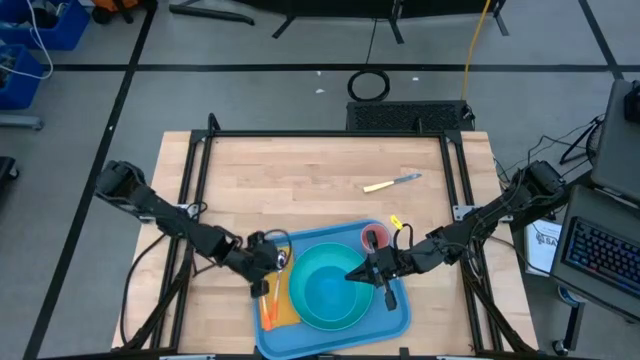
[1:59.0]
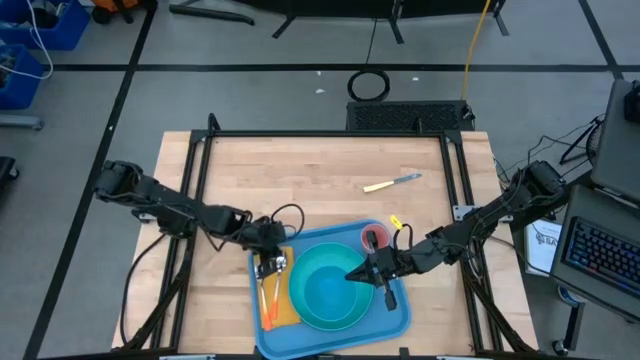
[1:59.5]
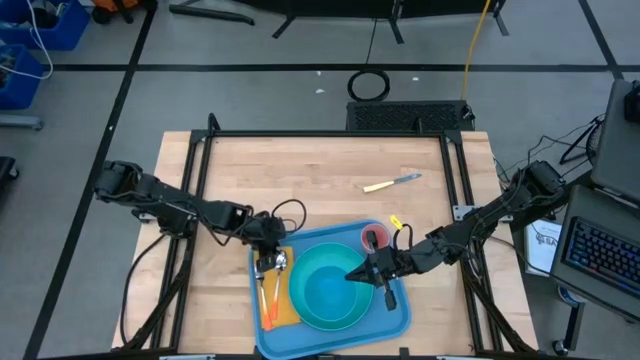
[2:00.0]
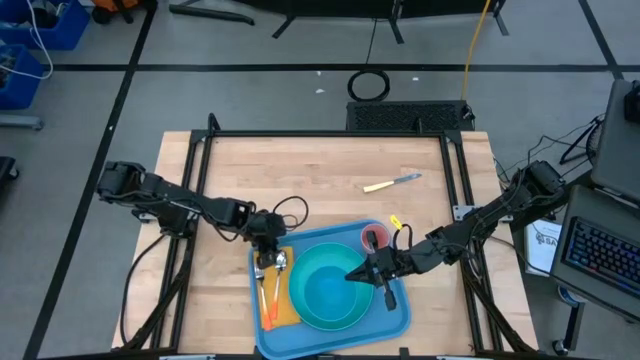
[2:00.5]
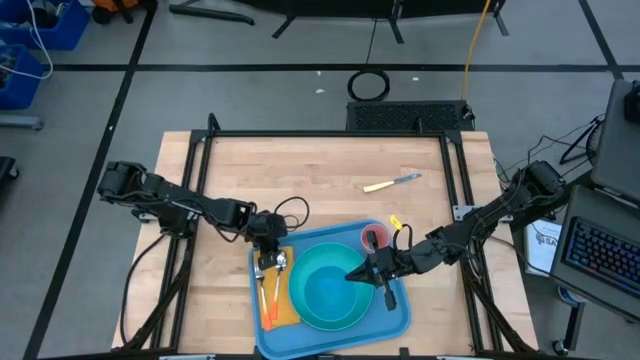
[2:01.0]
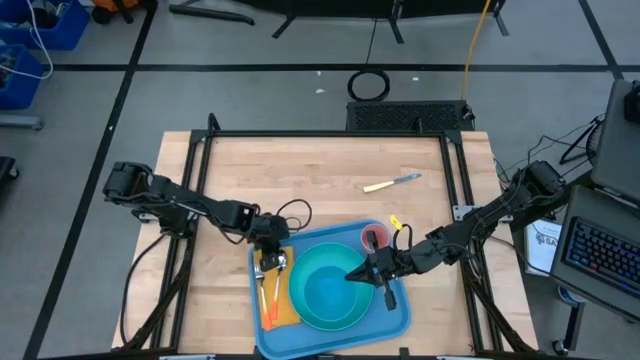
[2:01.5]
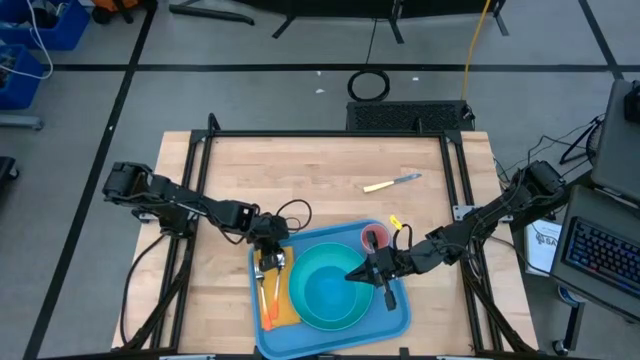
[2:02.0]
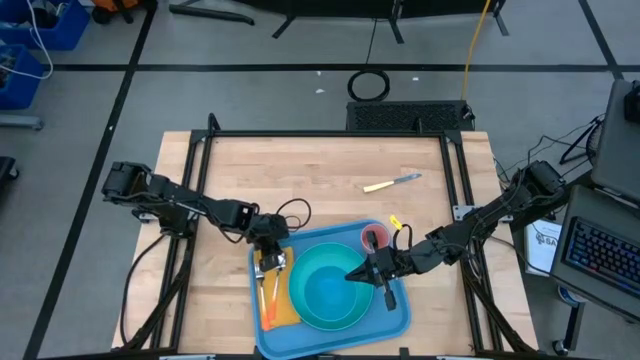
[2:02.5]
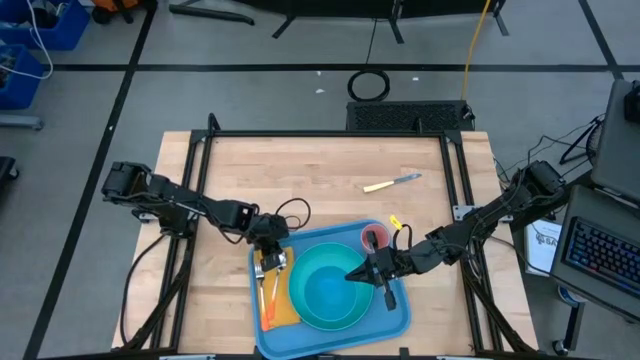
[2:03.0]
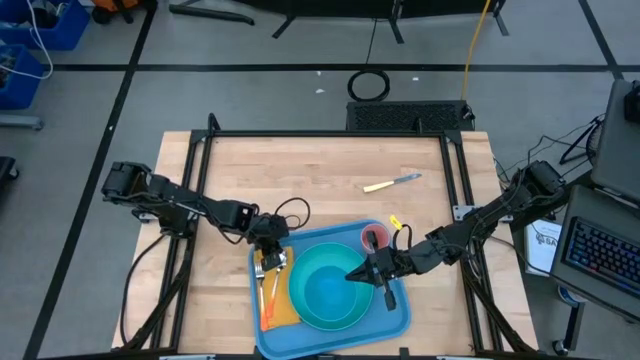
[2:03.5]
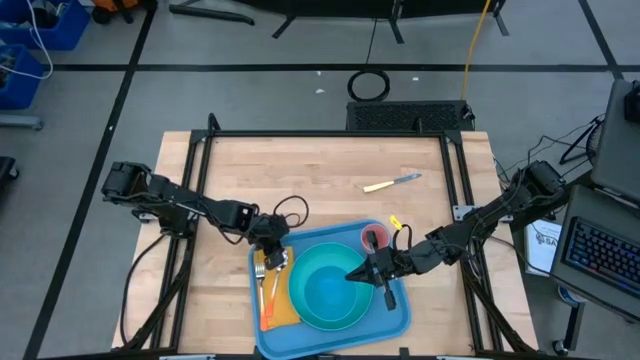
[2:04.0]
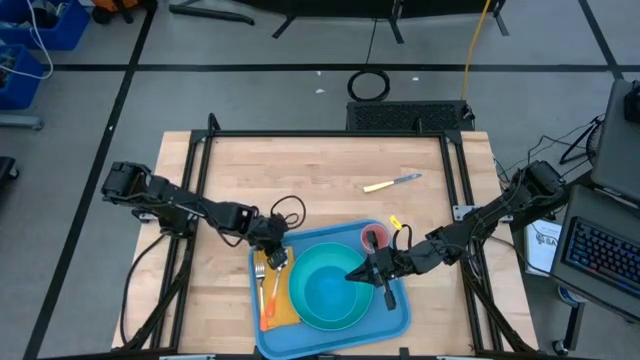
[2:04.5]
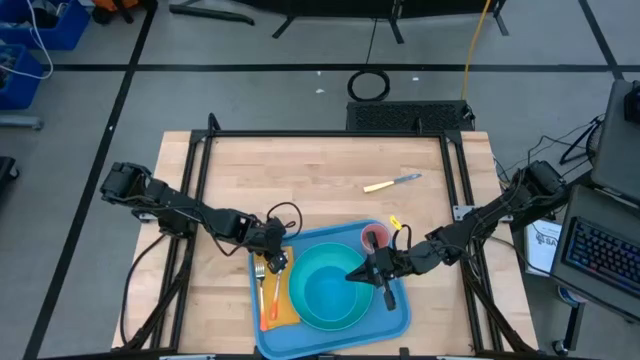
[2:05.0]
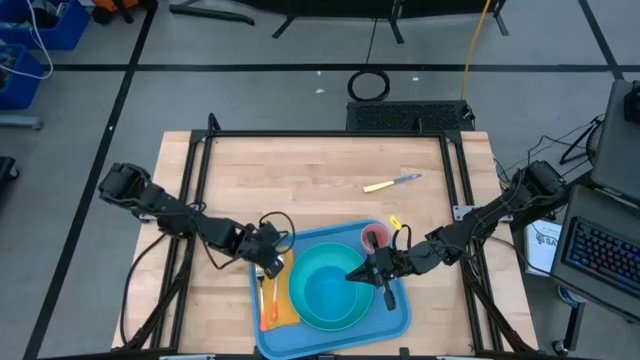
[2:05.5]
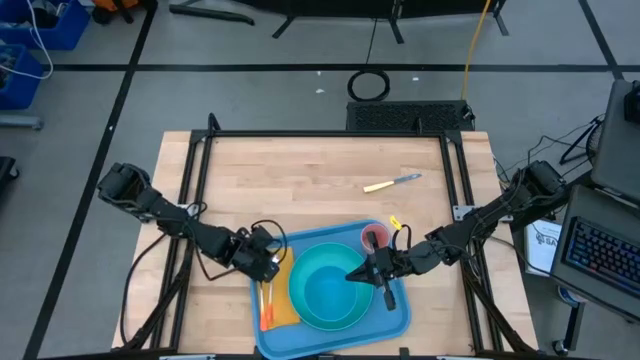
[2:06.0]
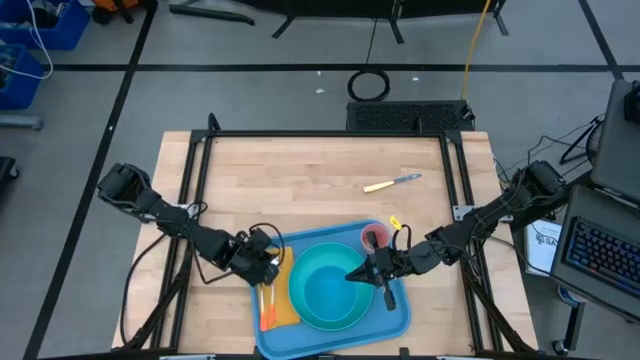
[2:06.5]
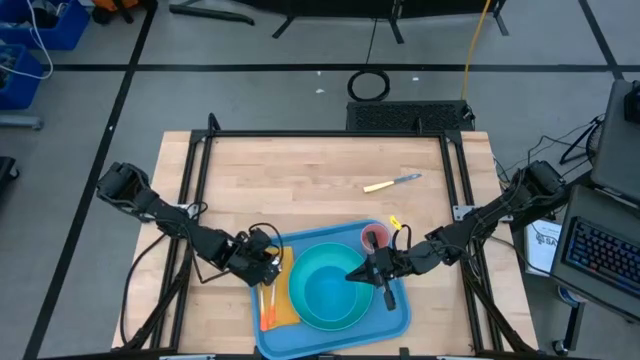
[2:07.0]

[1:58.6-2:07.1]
Task: Set up tray
Adjust the spoon on the napkin

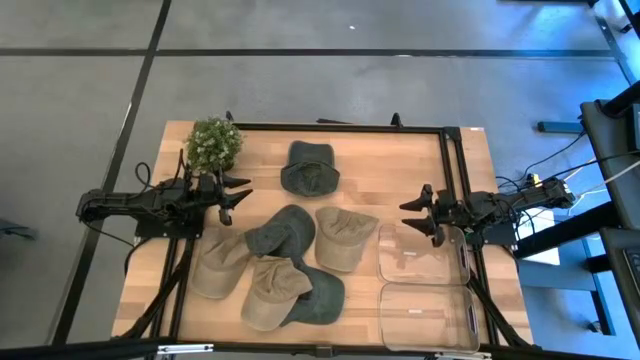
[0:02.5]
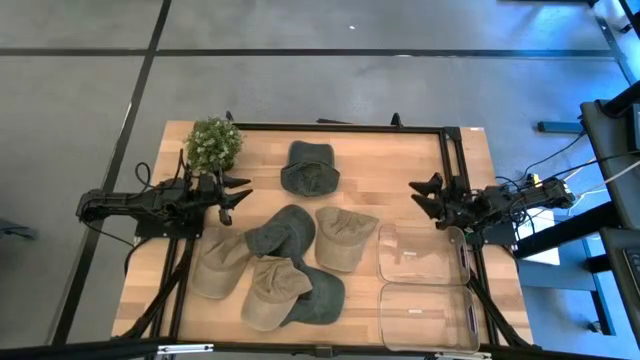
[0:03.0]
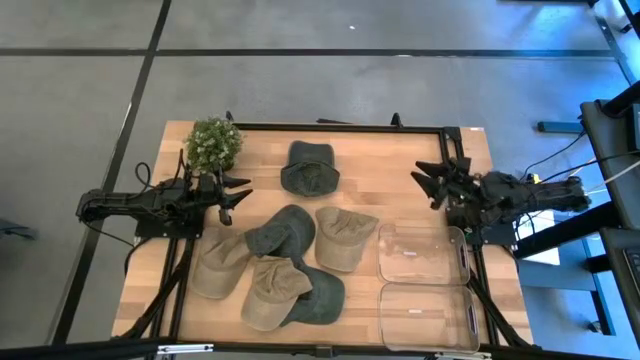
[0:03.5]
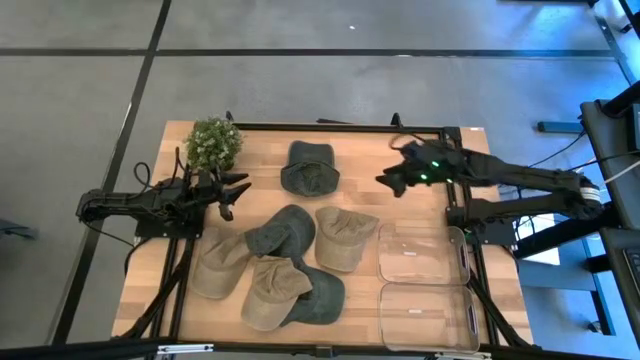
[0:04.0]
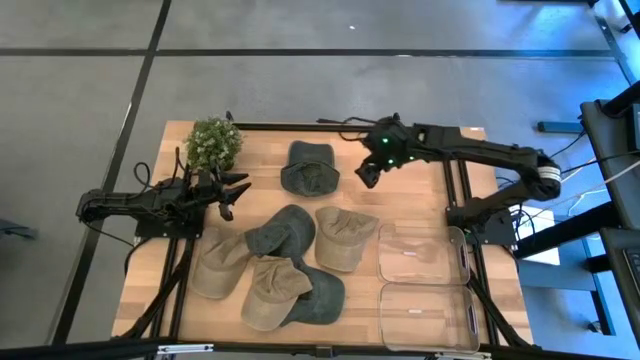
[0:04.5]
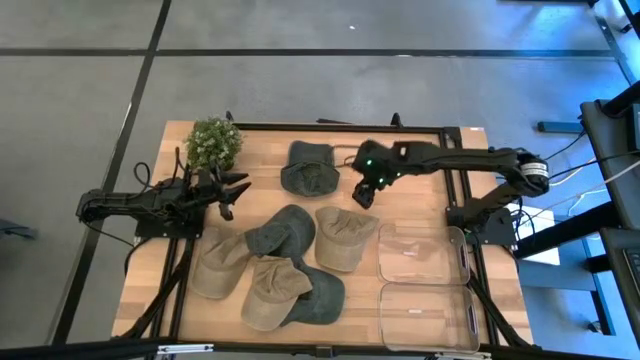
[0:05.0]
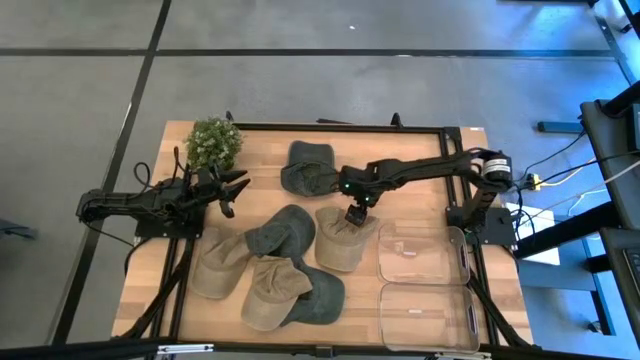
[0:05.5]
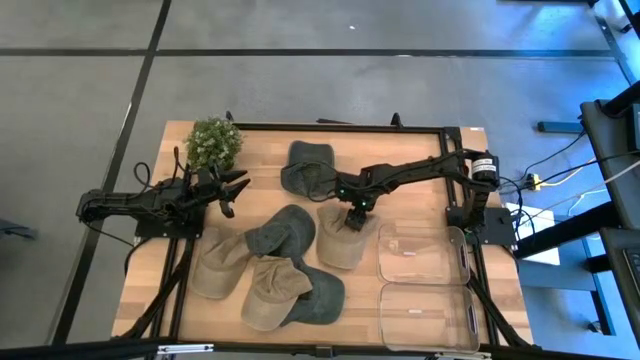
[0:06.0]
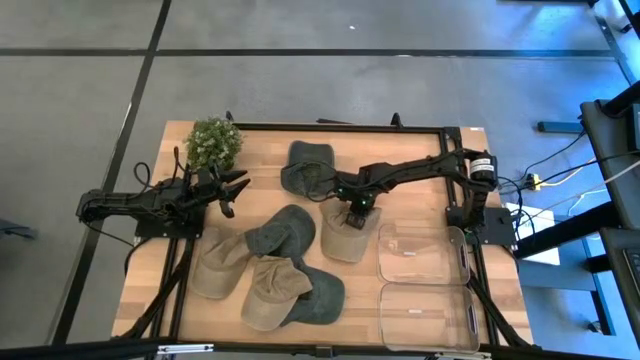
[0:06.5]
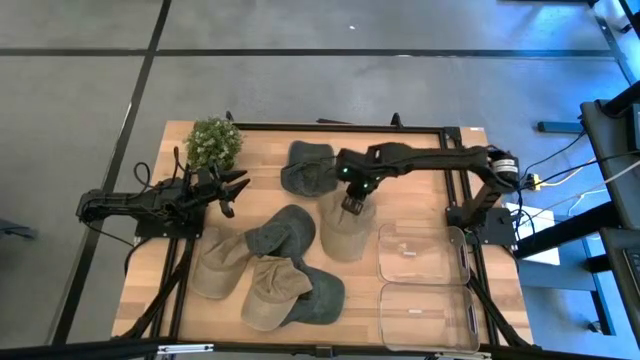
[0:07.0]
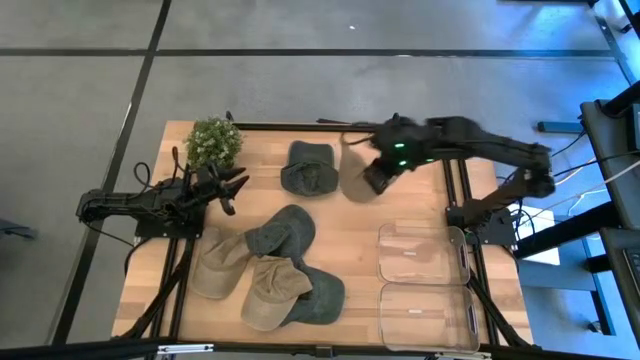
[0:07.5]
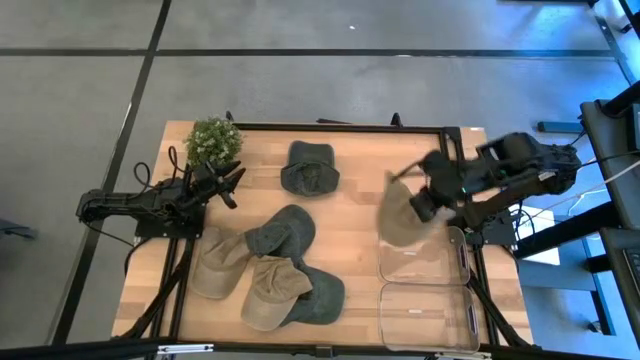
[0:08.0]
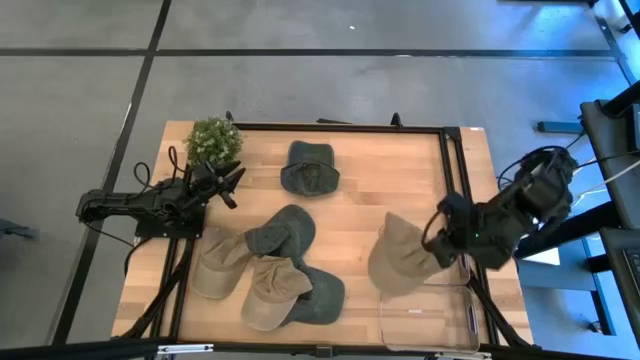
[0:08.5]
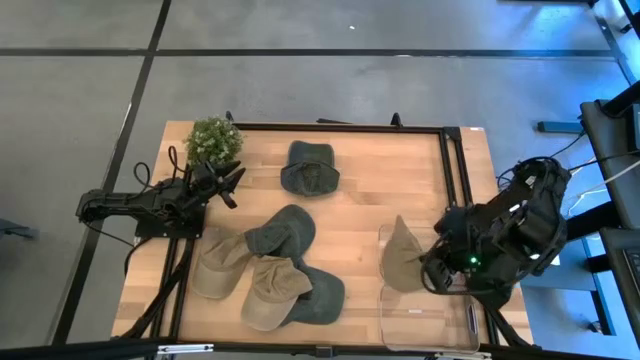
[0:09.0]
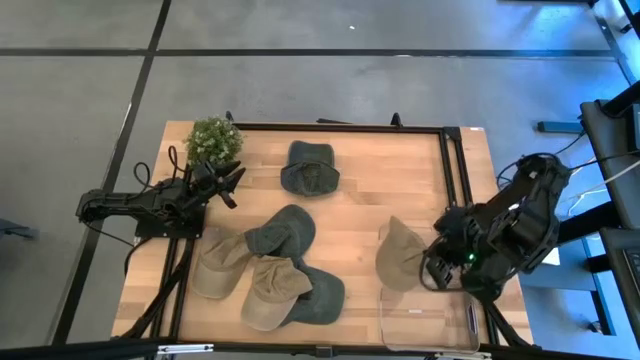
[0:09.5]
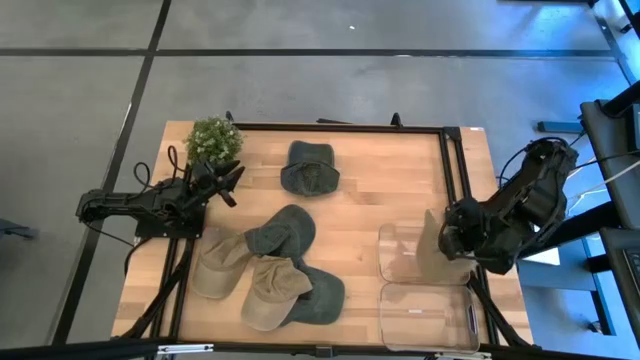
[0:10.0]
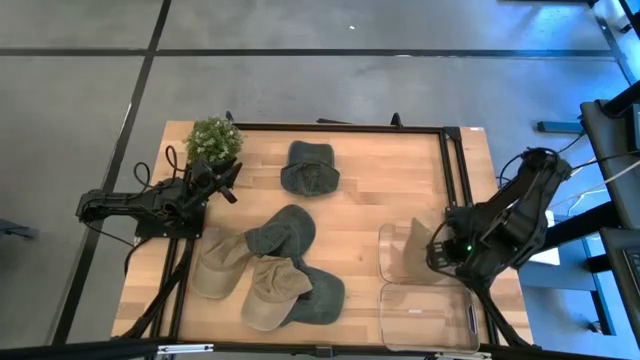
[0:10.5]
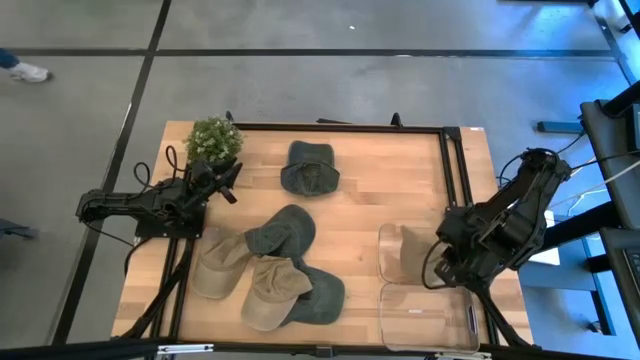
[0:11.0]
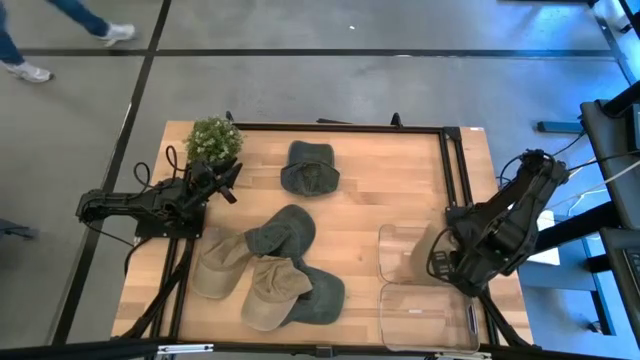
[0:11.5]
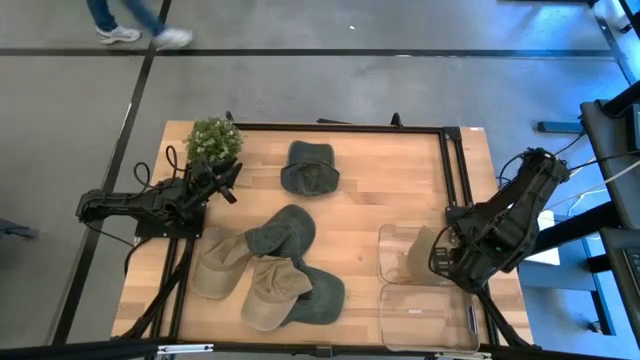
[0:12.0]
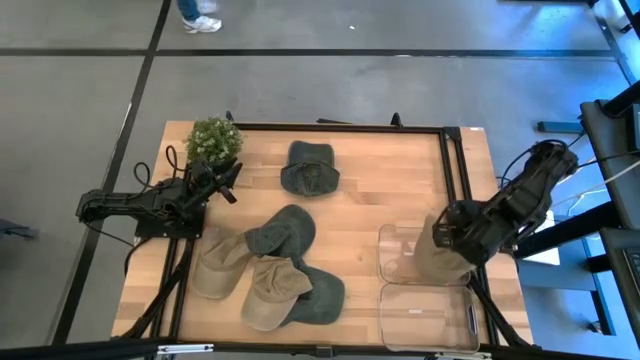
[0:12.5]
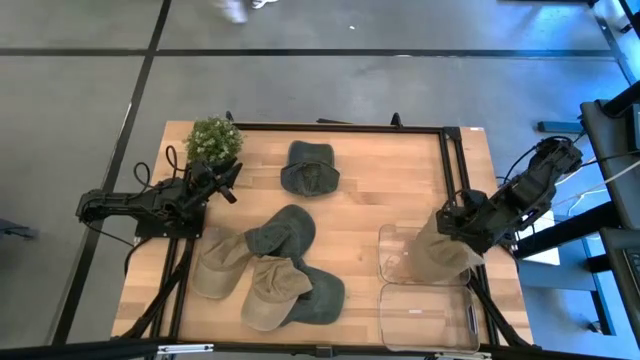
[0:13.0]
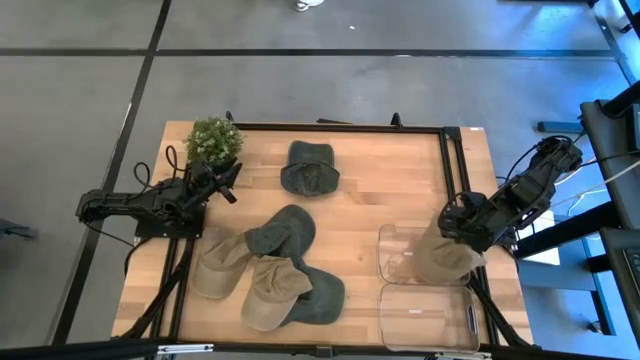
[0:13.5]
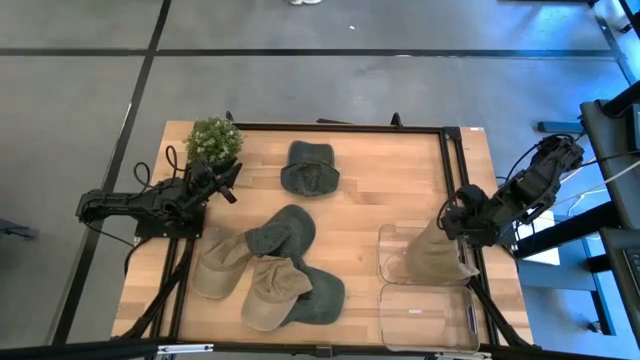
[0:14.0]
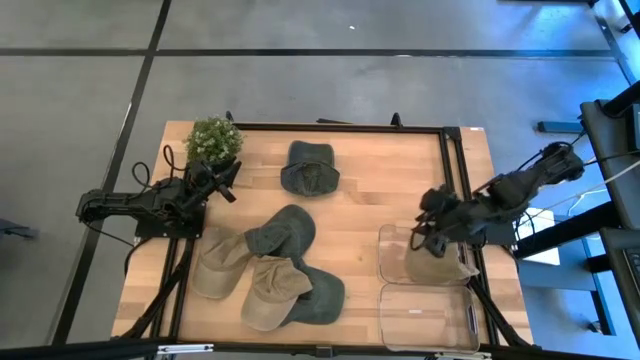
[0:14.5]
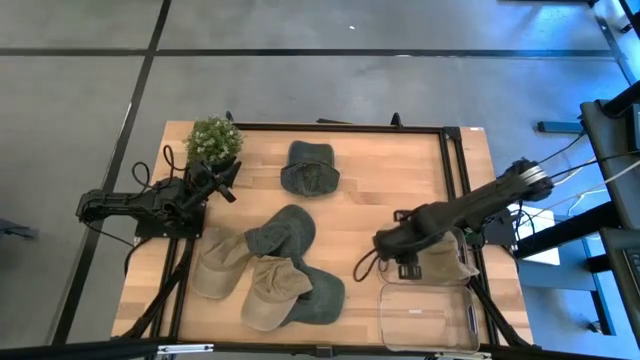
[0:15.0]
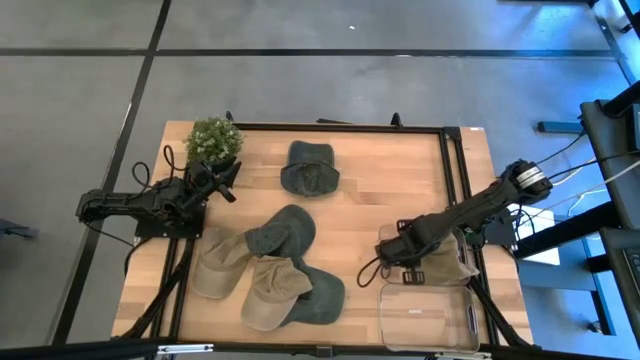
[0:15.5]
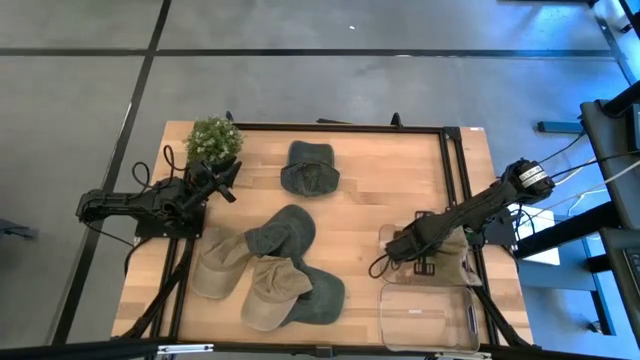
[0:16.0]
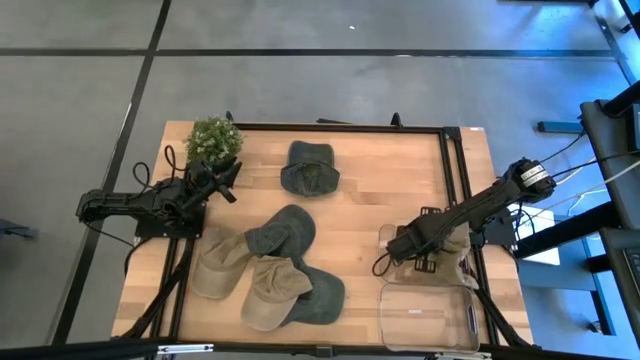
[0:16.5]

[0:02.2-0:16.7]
Task: Pick & Place hat
Put the right brown cap into the top transparent bin
